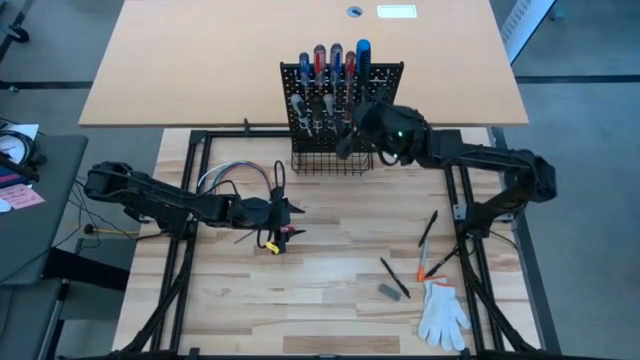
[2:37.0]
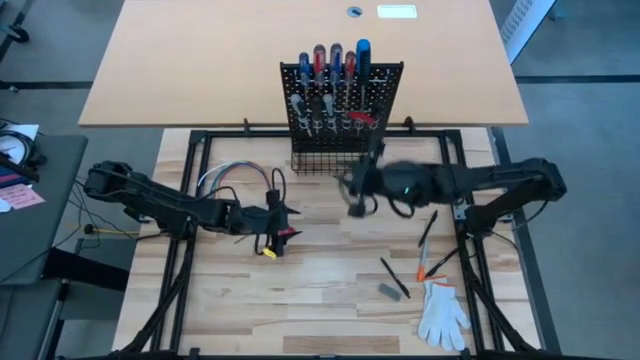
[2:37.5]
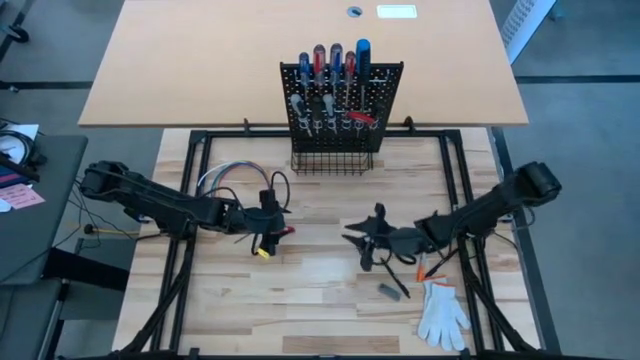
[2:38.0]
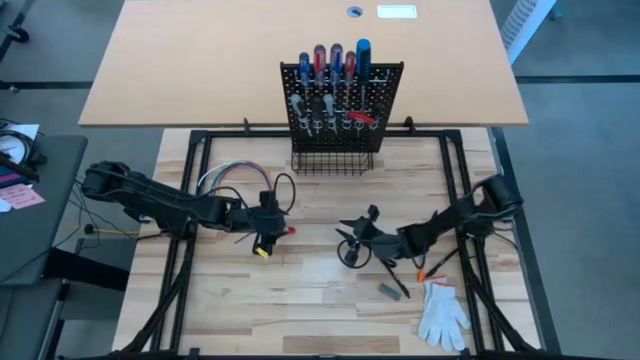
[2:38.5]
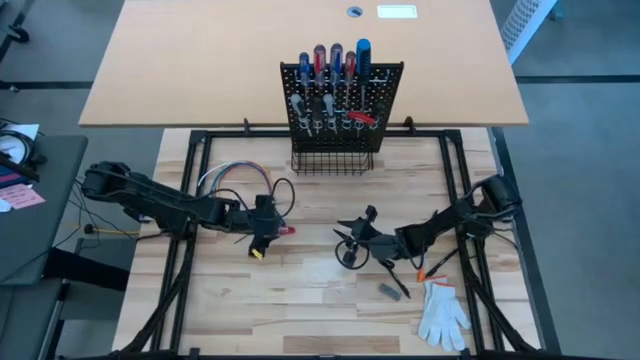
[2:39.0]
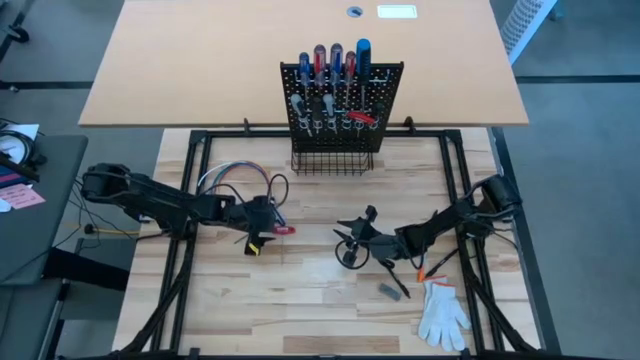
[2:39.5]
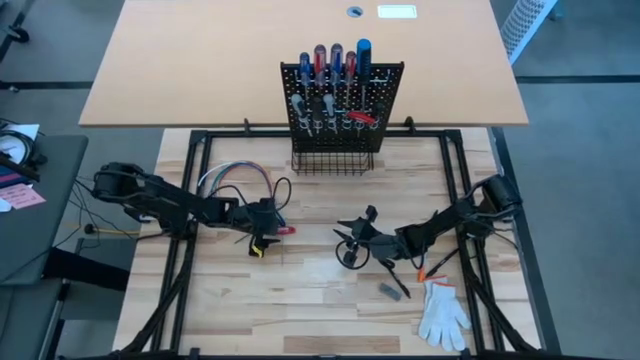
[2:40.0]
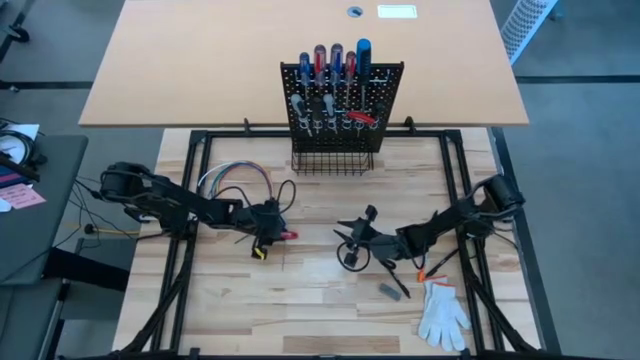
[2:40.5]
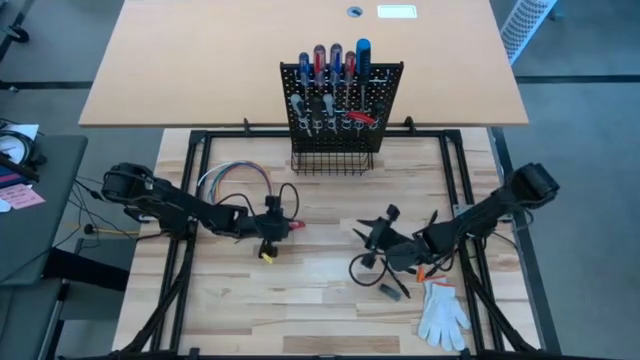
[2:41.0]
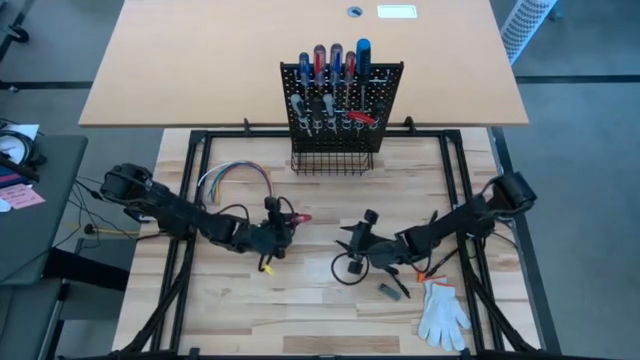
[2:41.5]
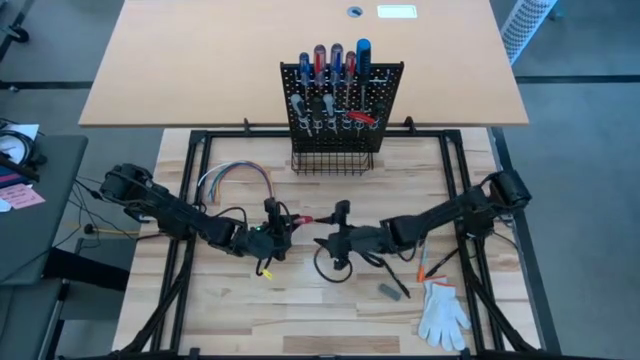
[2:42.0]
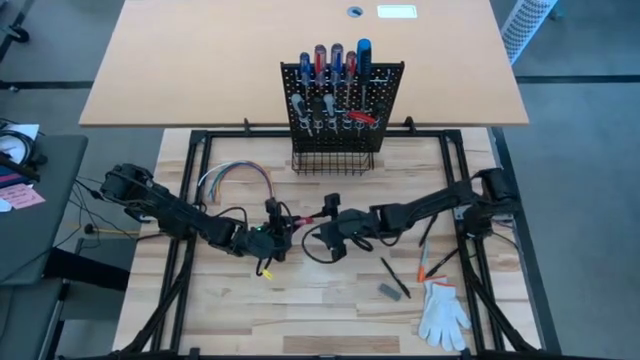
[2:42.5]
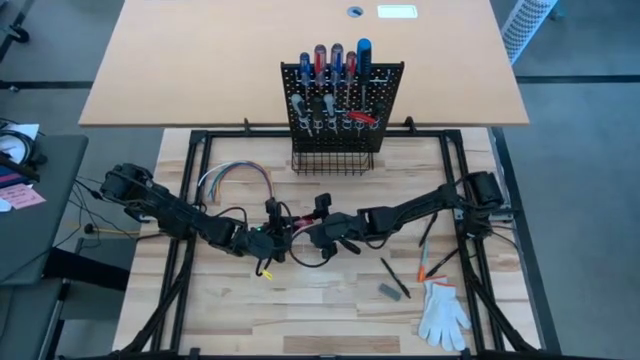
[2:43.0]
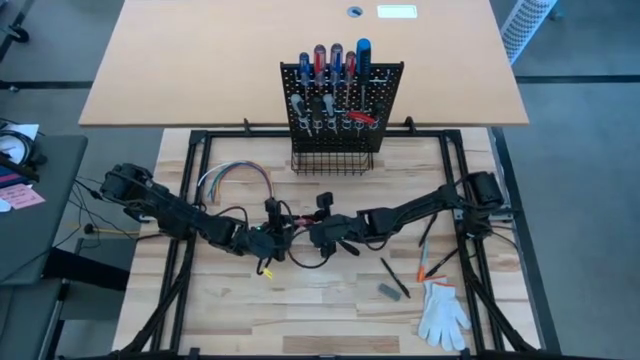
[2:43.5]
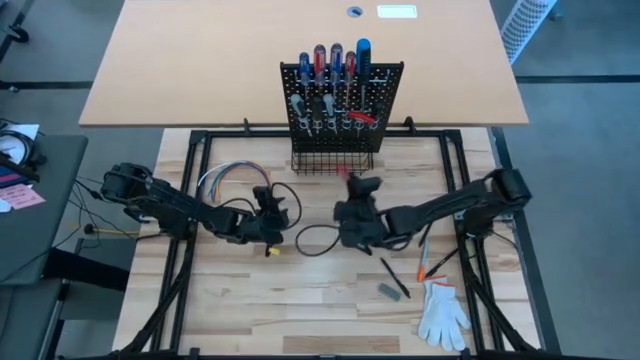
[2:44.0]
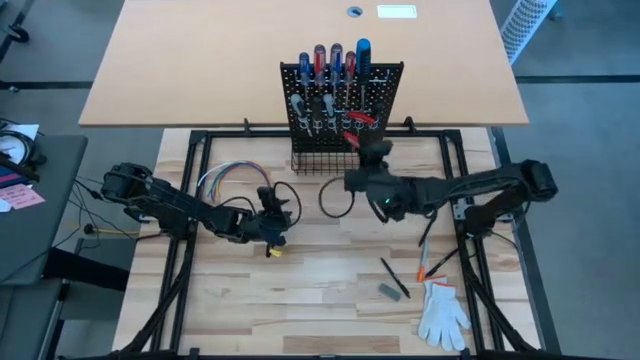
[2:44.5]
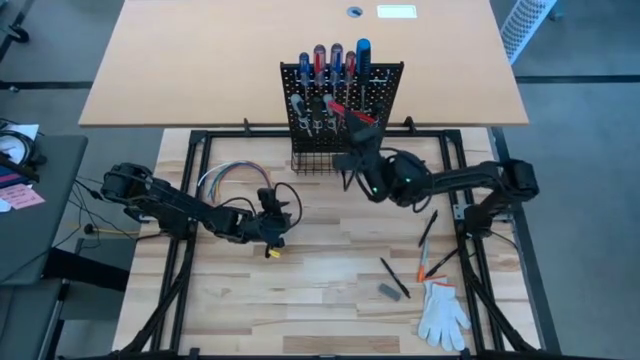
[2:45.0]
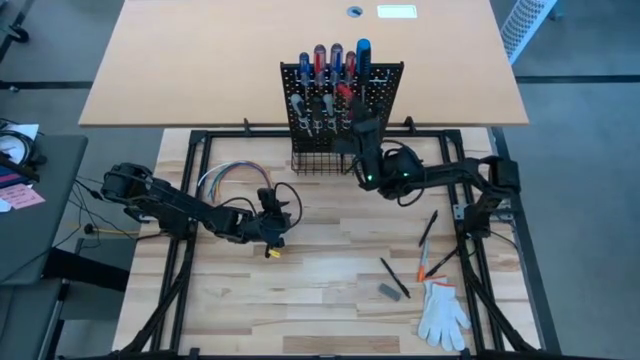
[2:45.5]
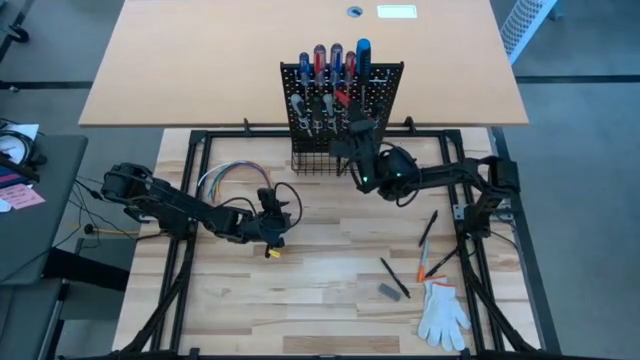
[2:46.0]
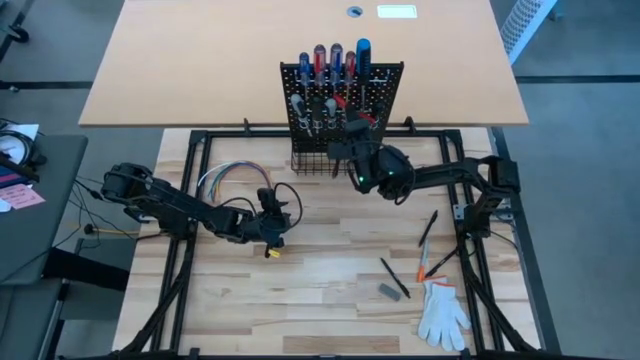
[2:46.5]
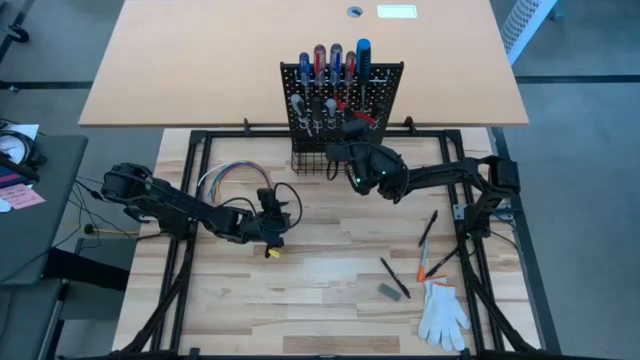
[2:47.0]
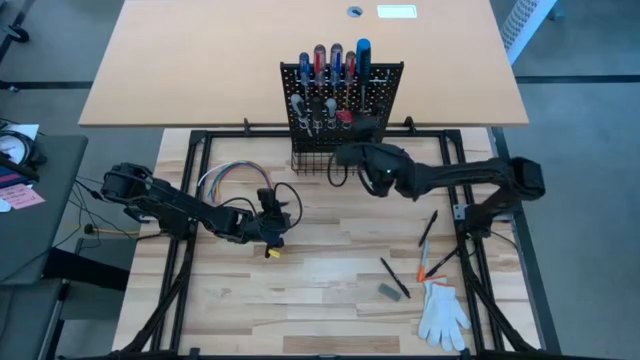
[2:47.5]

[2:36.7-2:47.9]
Task: Hang tools onto peg board
Hang the red t handle screwdriver on the black peg board

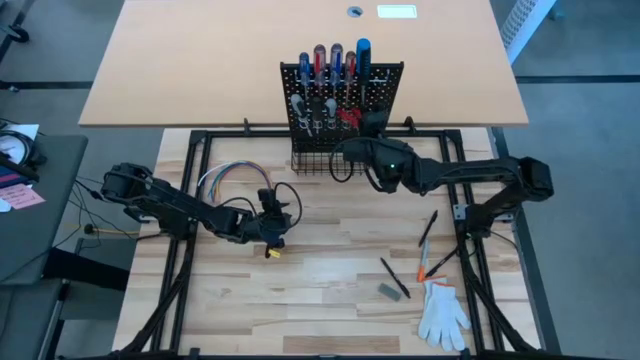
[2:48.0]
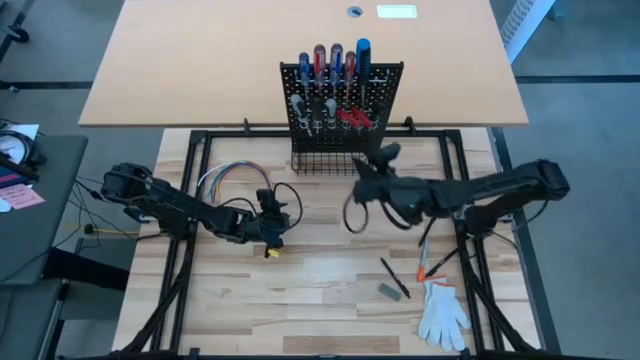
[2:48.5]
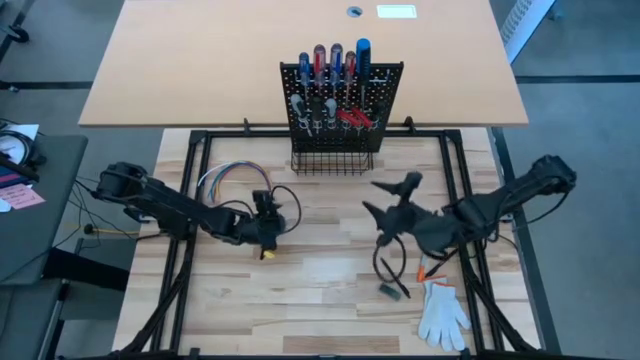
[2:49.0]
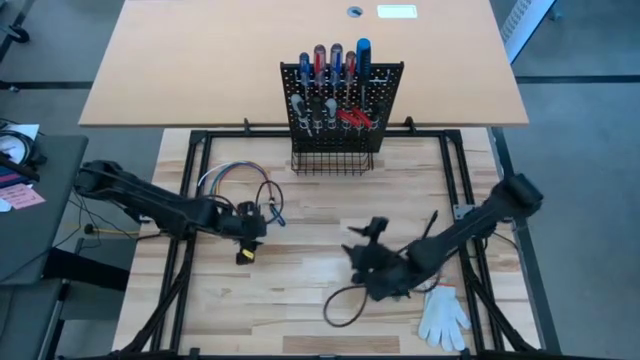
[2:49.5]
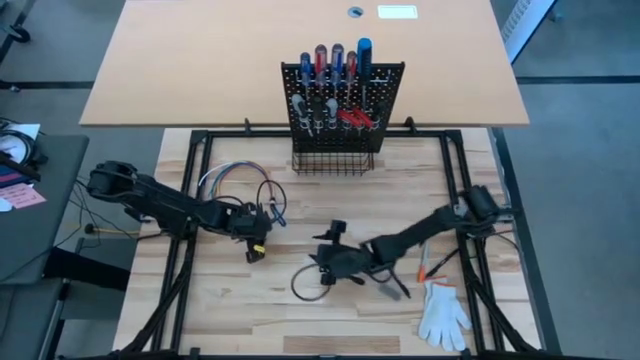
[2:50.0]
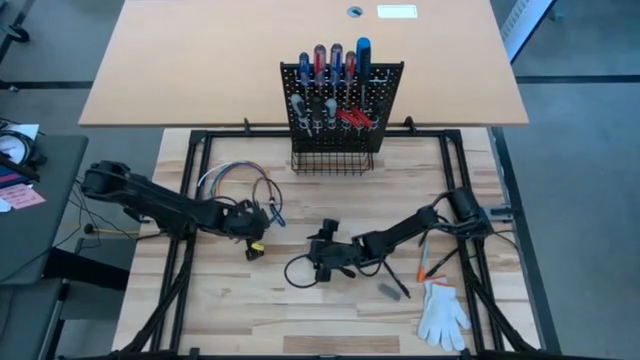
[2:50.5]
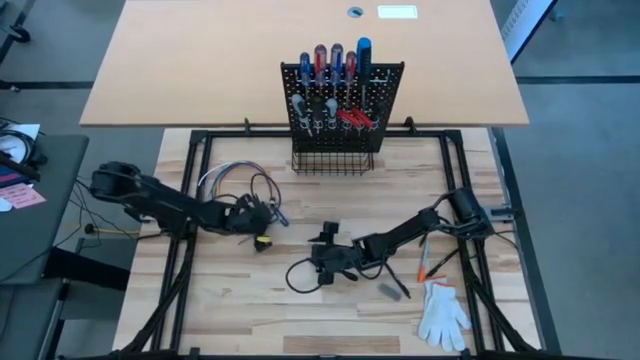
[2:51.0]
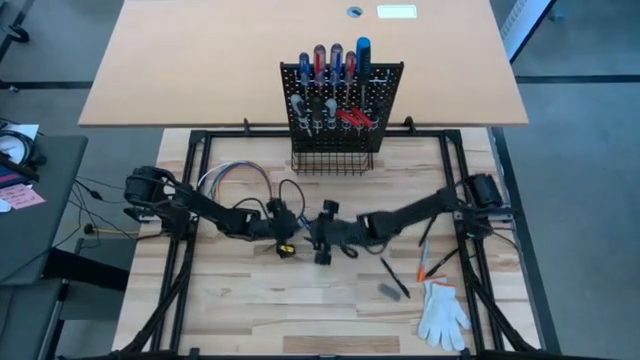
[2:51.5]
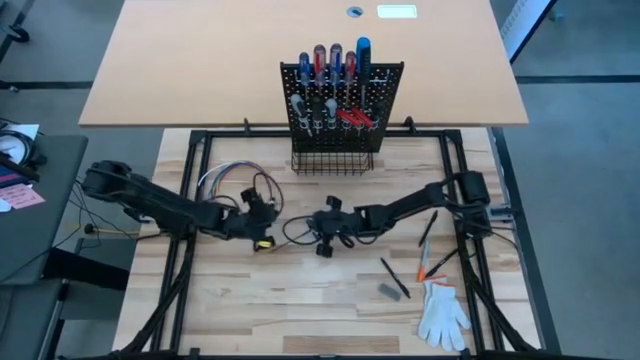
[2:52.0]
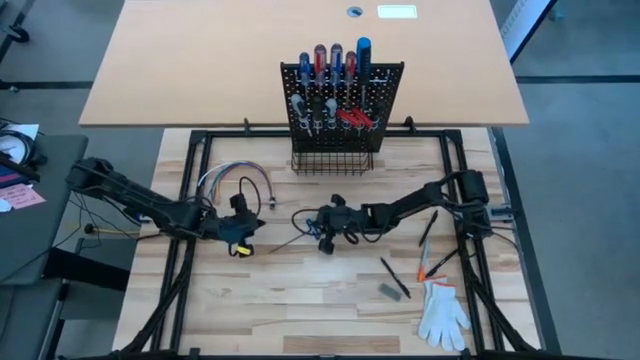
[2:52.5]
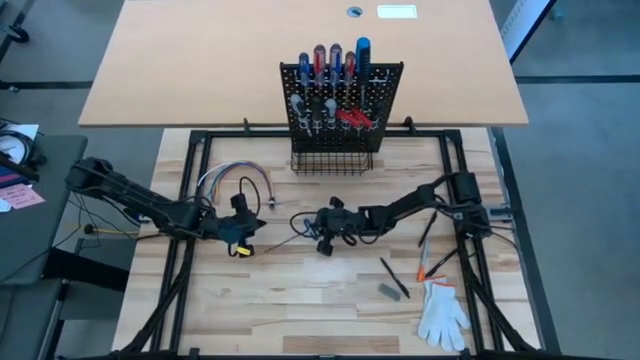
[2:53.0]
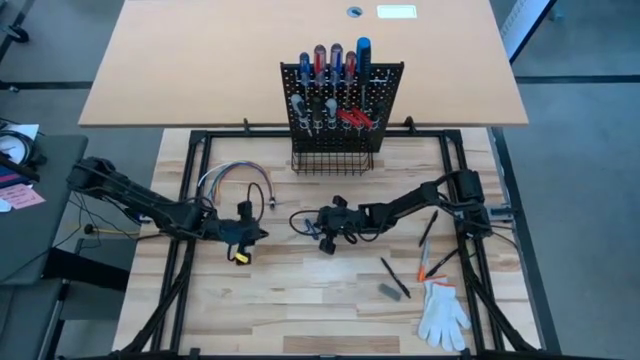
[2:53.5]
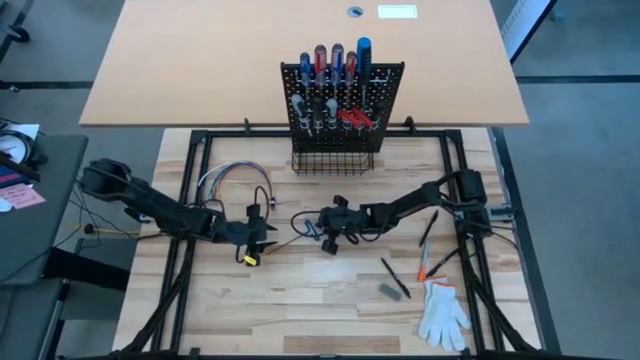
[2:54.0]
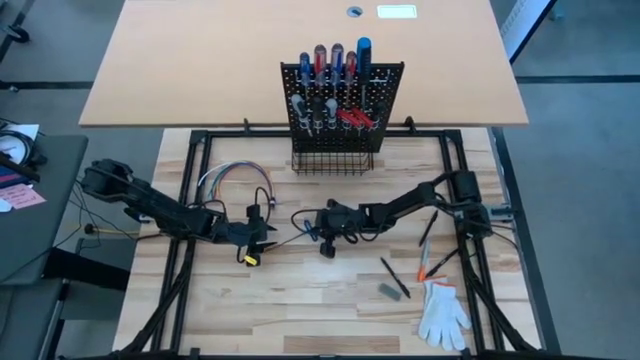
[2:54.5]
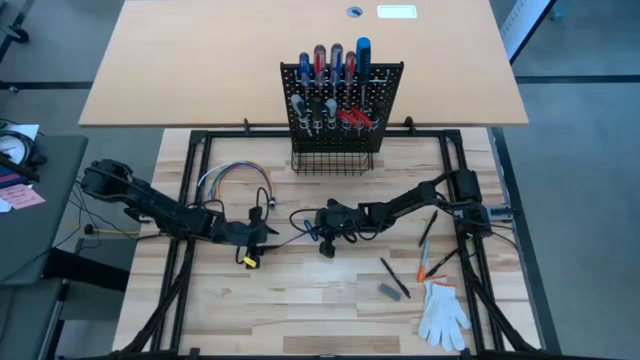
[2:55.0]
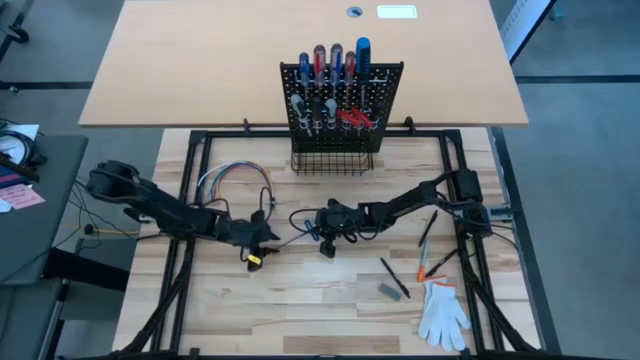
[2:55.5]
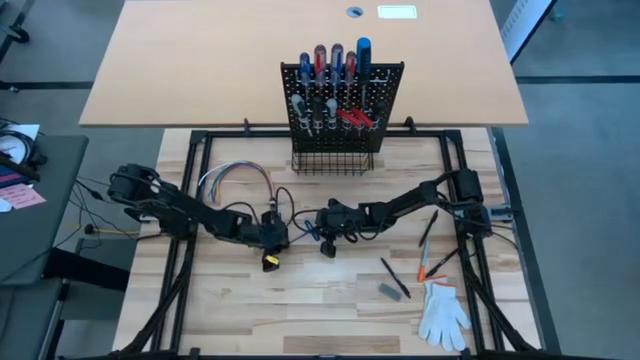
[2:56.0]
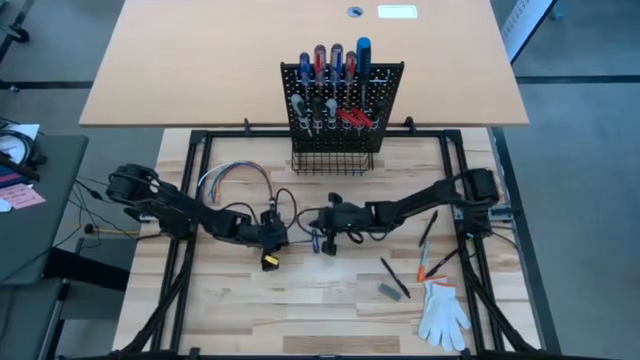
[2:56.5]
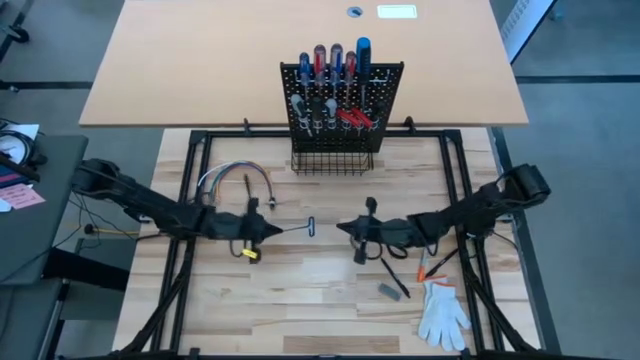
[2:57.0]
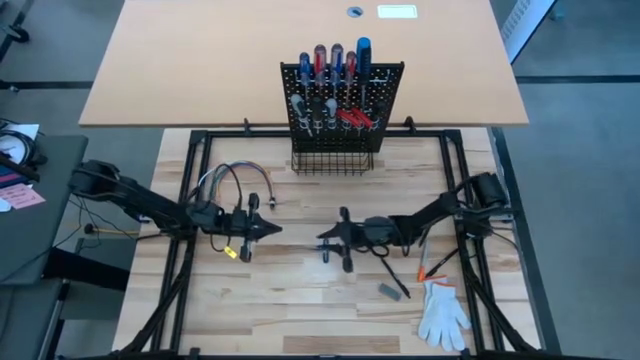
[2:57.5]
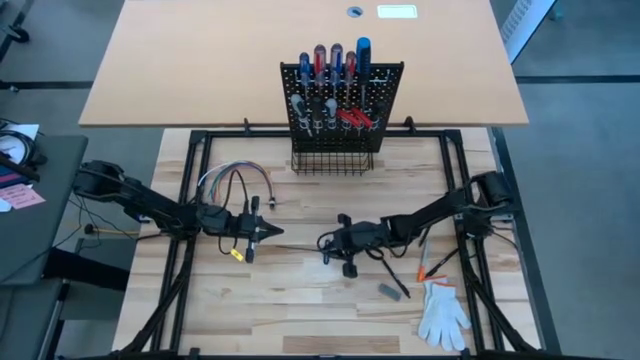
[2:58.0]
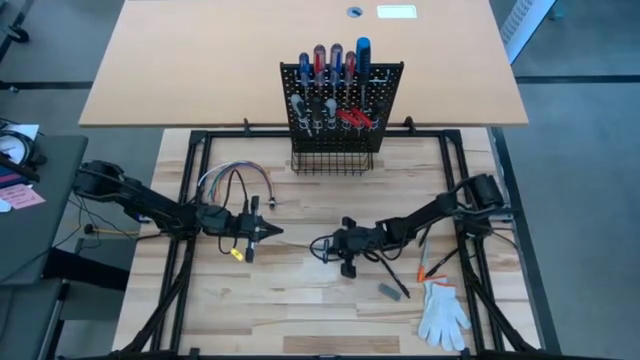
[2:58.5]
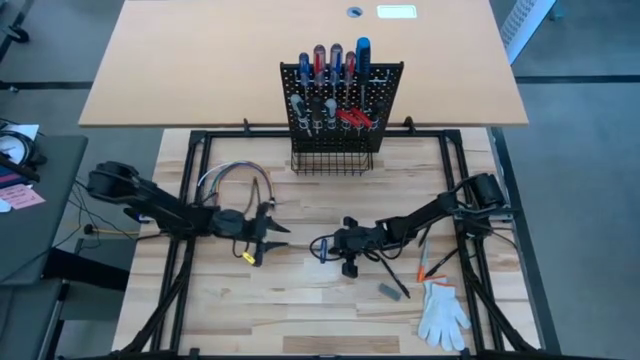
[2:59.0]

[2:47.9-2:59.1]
Hang the blue t handle screwdriver on the black peg board
